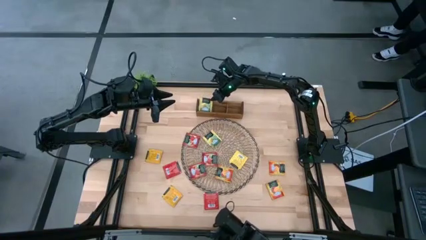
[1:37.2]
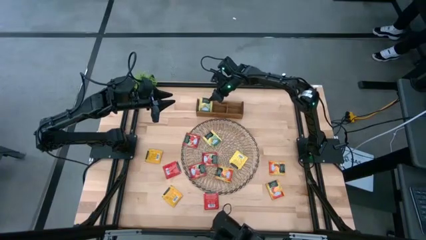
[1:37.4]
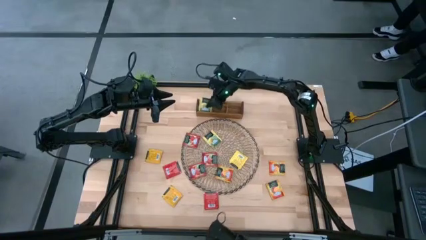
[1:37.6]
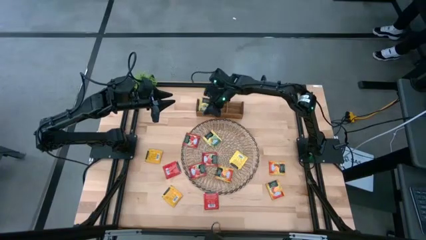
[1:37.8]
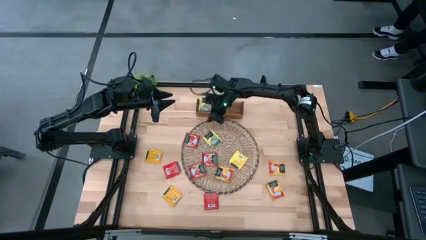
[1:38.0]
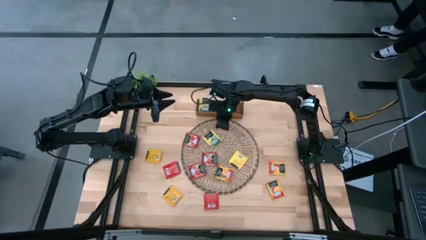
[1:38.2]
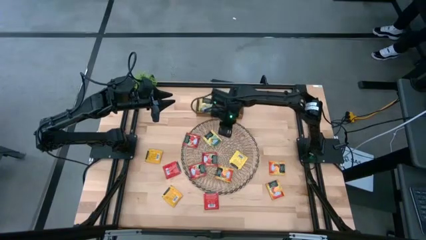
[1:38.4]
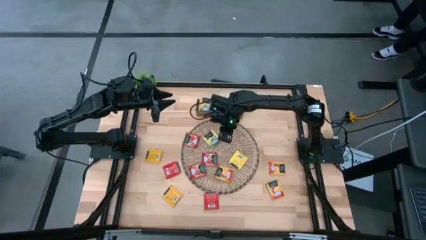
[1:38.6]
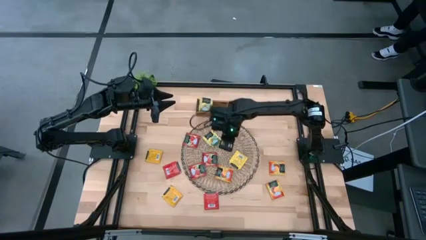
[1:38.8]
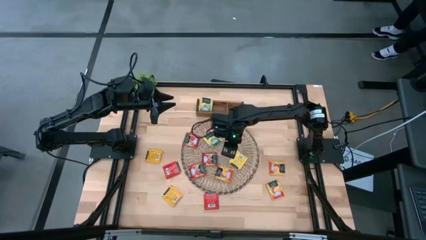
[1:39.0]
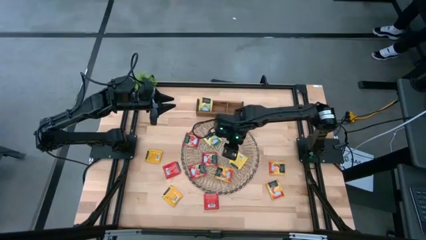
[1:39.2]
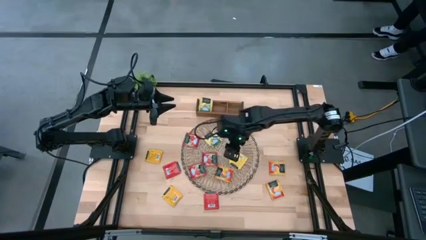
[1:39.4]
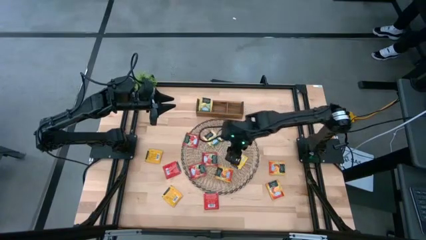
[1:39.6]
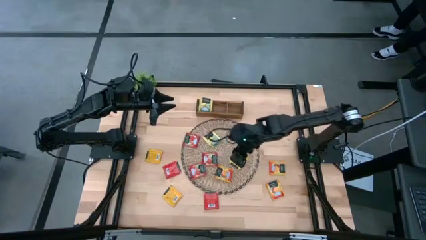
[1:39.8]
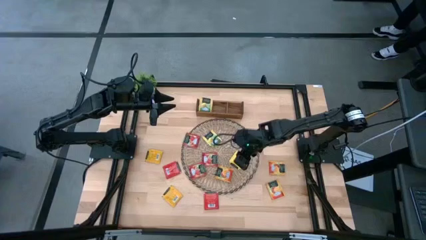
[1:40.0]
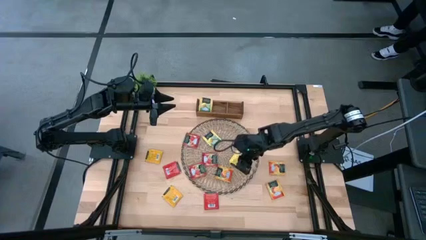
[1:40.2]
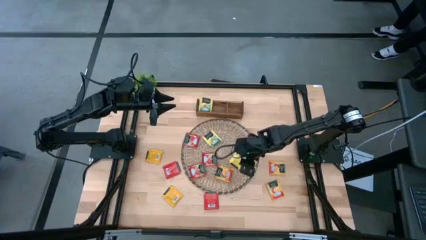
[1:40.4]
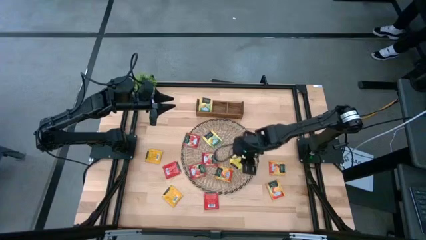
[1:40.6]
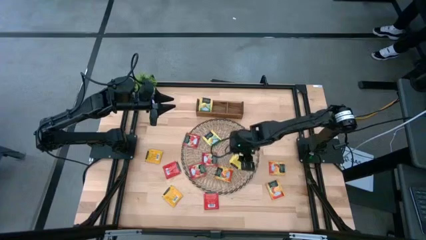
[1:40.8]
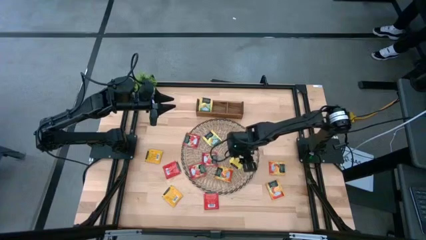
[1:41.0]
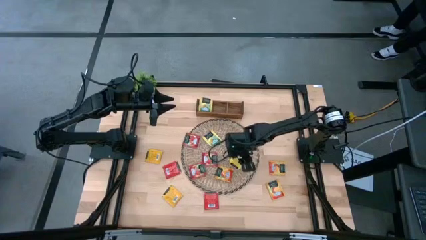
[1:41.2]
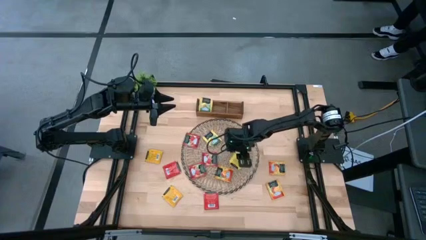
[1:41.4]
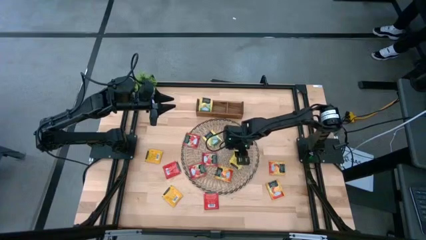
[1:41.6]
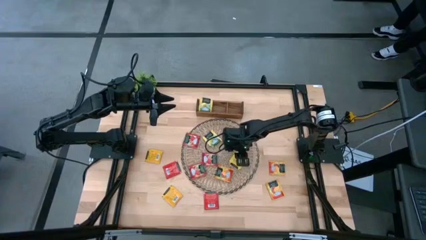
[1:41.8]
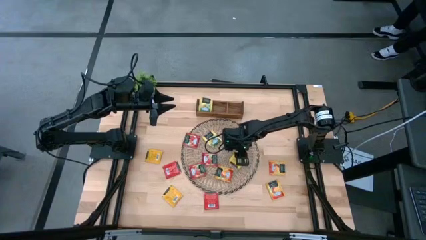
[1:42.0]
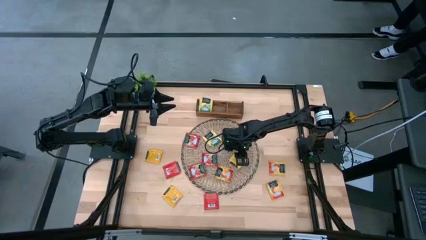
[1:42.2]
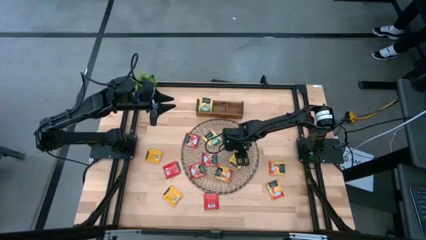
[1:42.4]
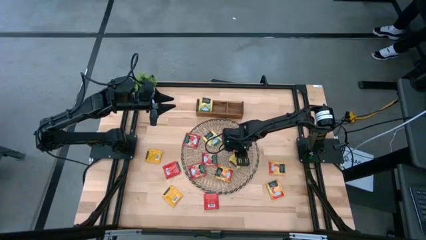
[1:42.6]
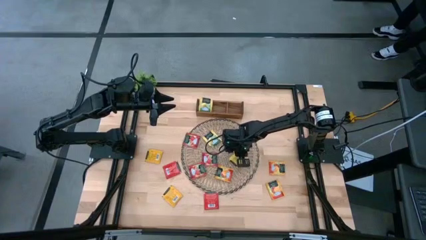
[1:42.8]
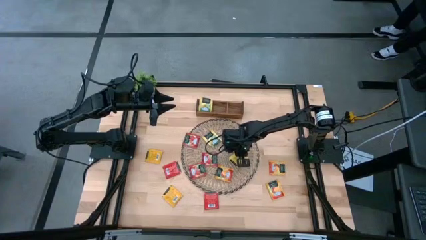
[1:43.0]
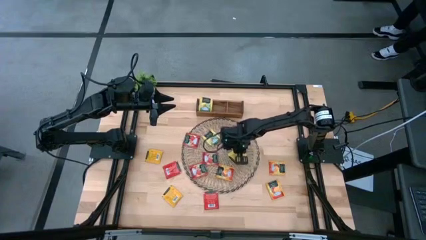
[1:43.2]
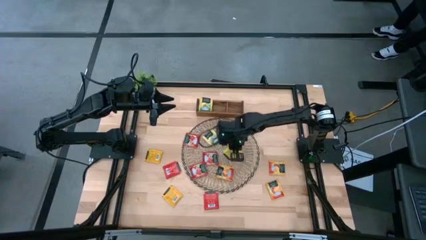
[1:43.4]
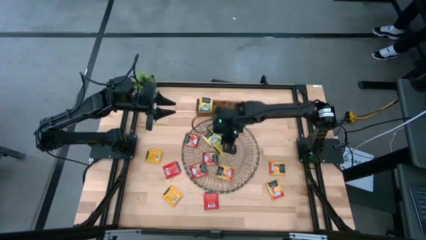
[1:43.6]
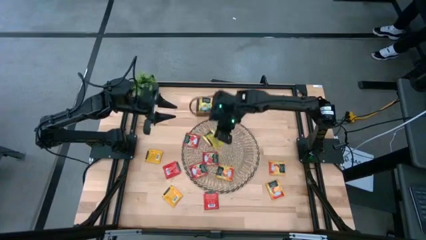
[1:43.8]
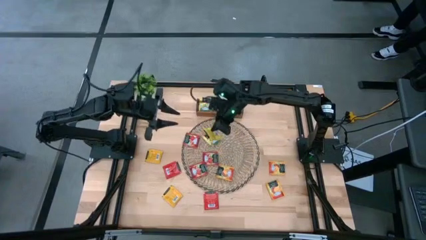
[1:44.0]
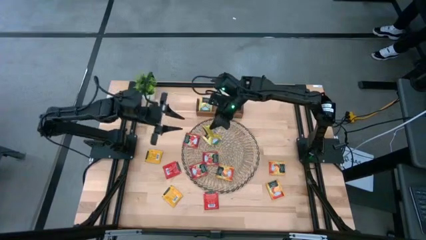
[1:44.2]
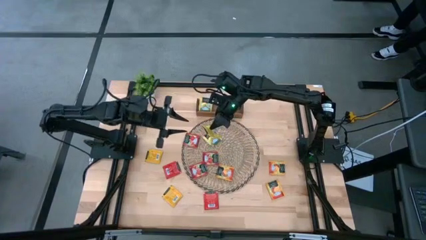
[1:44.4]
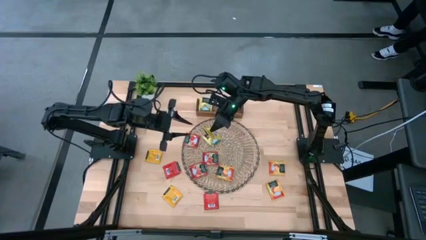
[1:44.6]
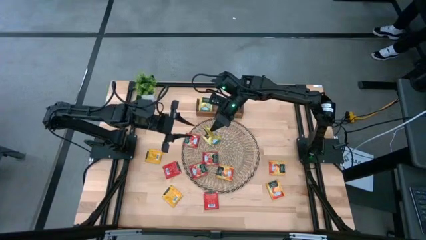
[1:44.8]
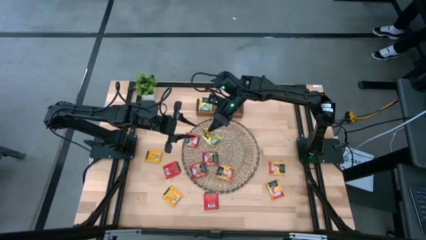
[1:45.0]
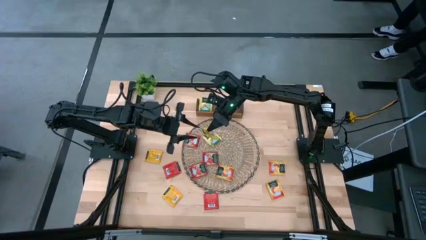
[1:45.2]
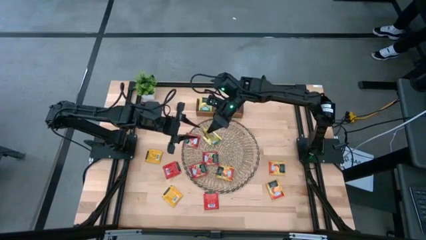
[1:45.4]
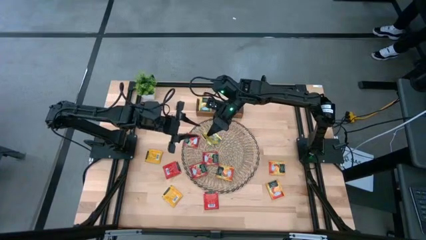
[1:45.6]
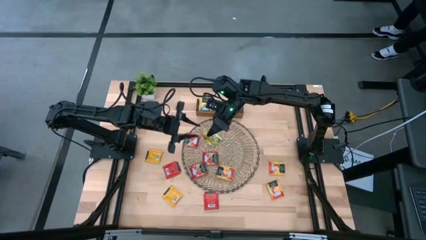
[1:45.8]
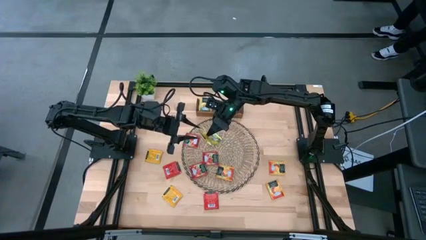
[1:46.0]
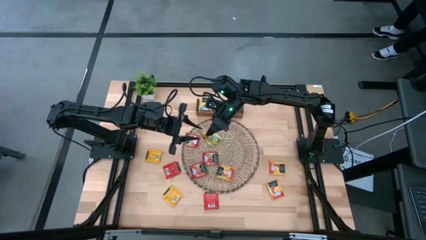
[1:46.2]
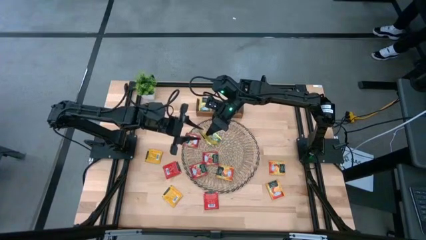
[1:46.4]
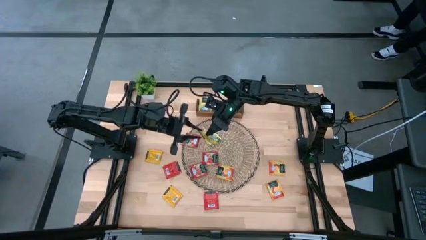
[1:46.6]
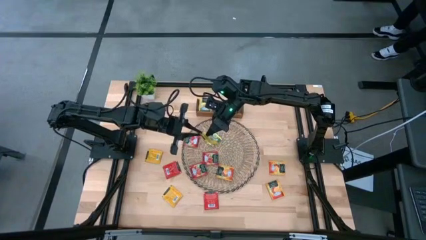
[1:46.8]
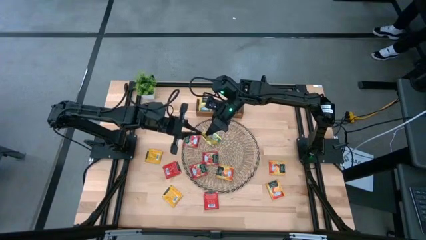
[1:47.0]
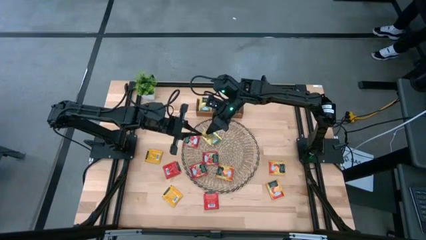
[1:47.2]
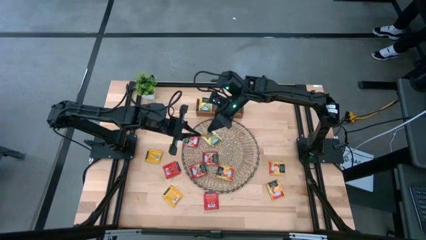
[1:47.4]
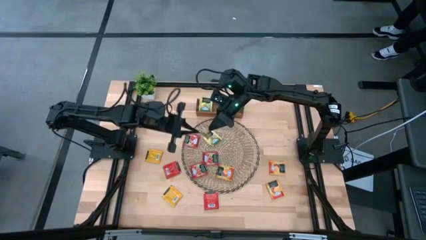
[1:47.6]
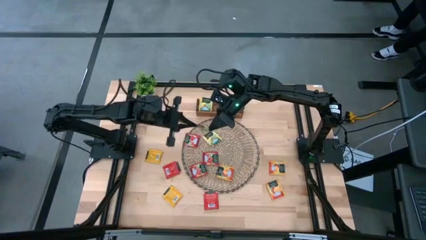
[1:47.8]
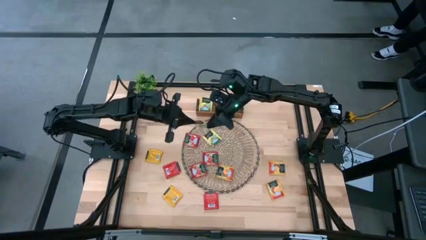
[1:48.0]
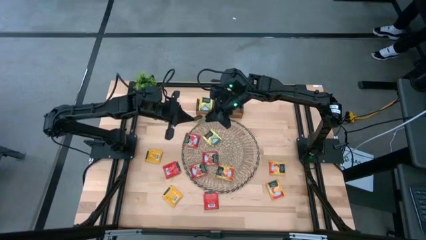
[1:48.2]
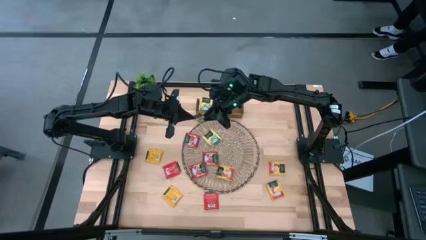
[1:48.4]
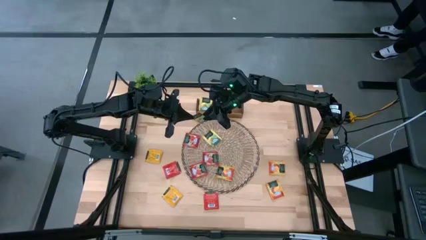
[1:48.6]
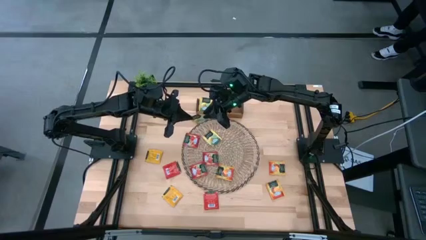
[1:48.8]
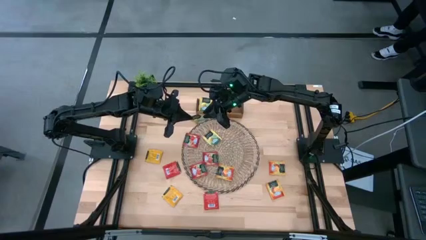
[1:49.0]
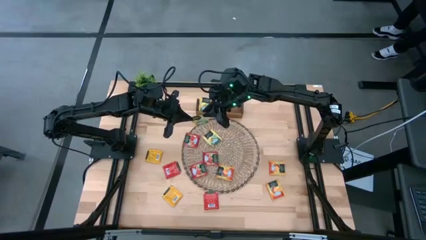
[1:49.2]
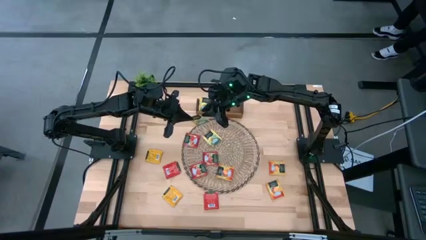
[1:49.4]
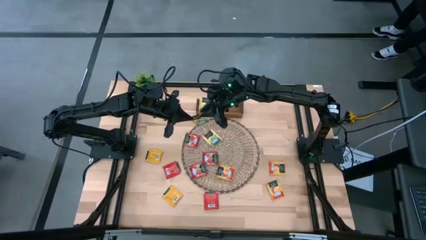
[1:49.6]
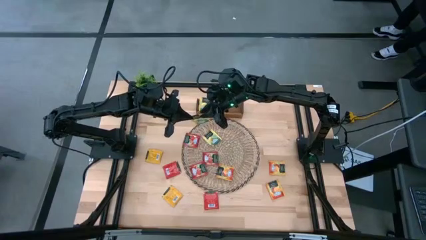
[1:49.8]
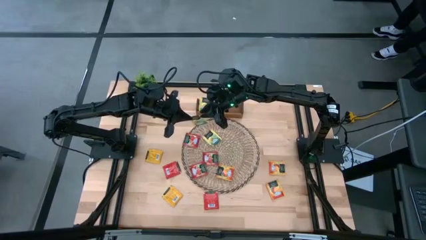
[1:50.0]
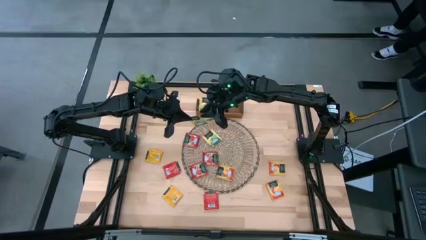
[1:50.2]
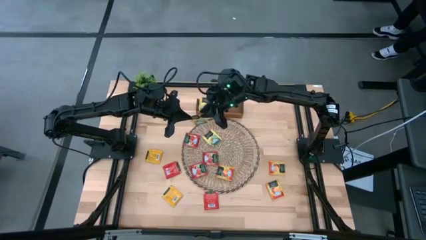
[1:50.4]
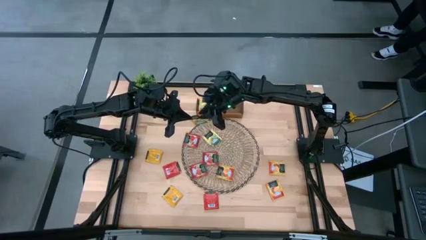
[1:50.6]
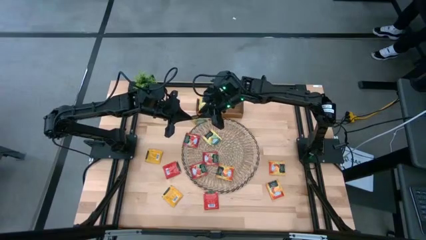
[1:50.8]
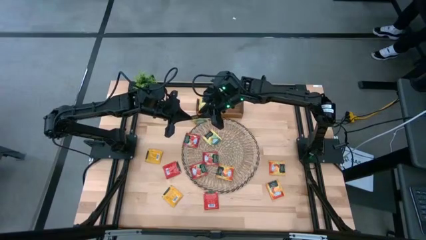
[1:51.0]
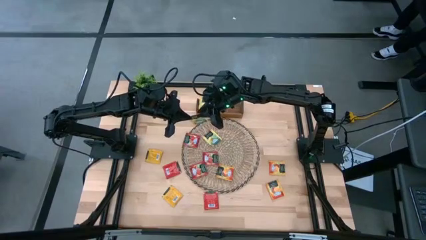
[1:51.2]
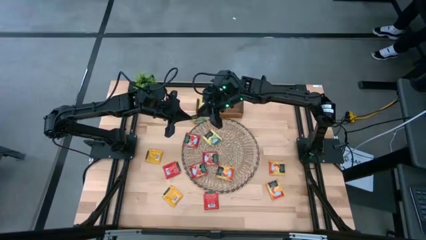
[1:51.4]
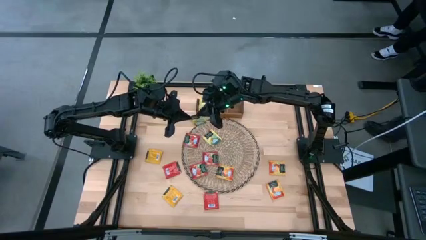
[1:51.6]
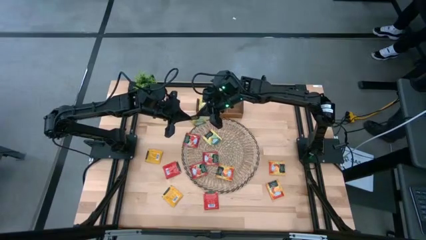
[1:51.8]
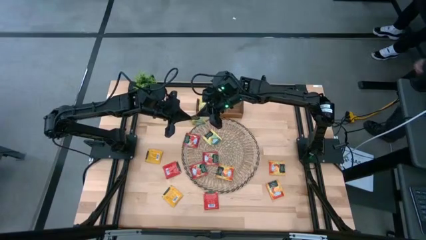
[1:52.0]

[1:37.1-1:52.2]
Task: Pick & Place Tea
Put the bottom yellow tea bag into the left of the wooden organizer
